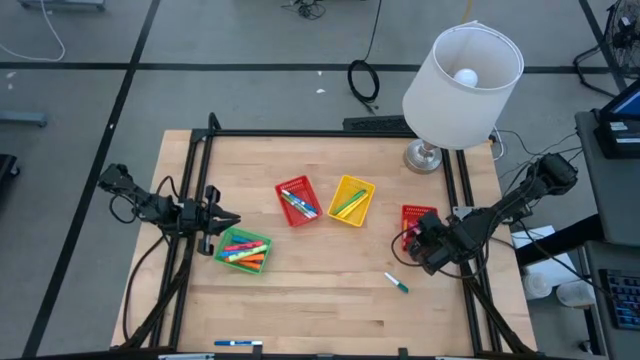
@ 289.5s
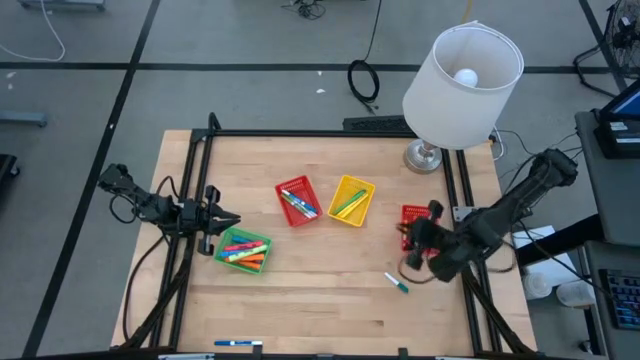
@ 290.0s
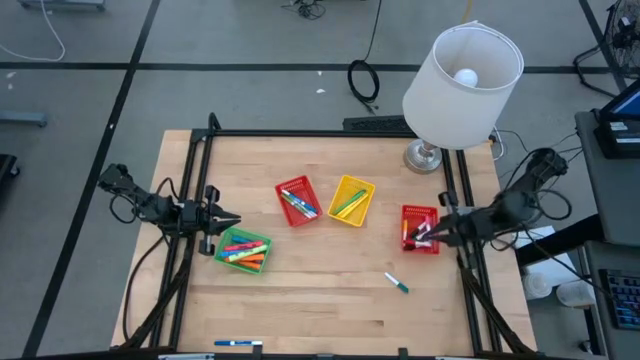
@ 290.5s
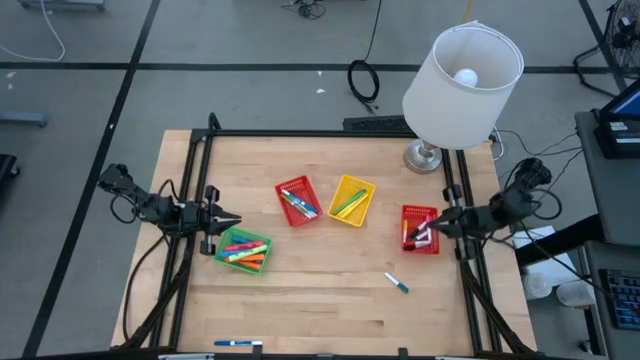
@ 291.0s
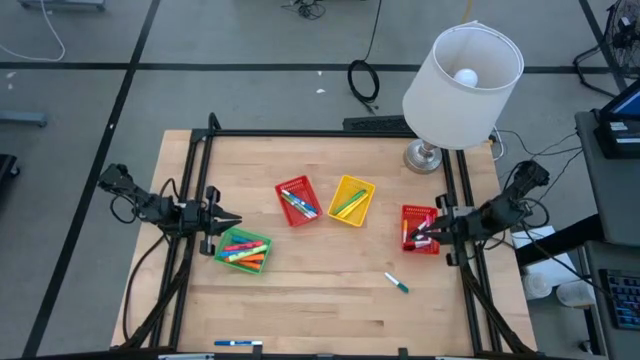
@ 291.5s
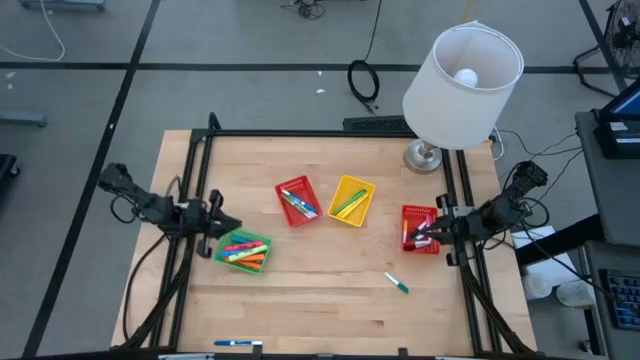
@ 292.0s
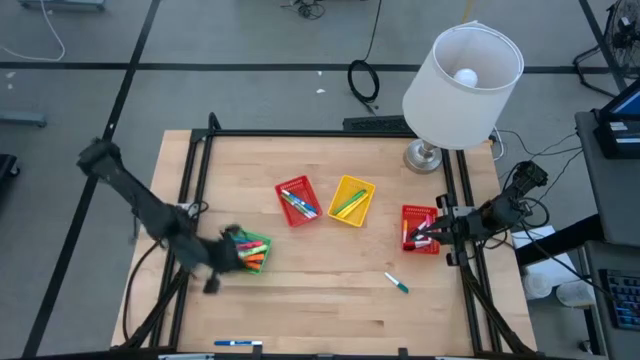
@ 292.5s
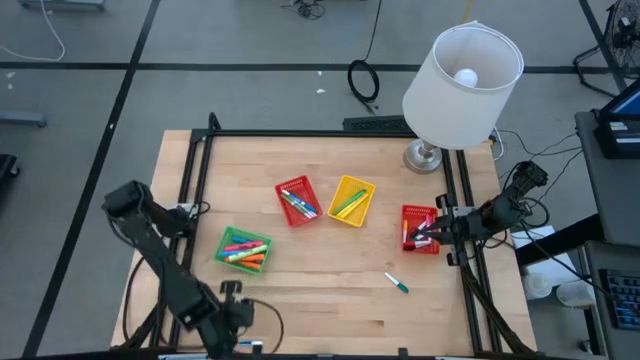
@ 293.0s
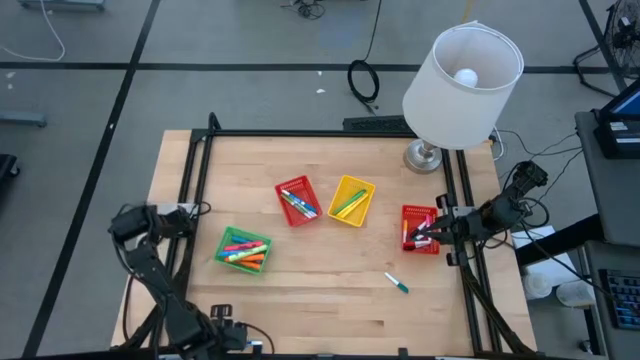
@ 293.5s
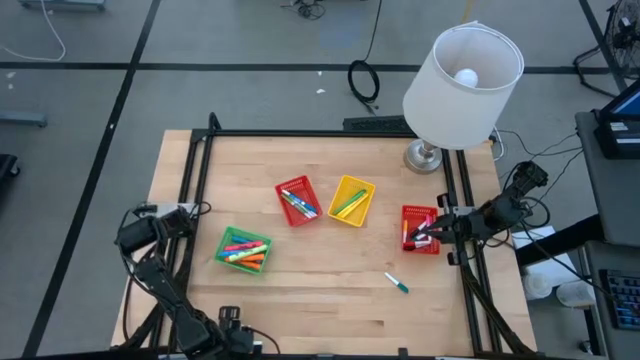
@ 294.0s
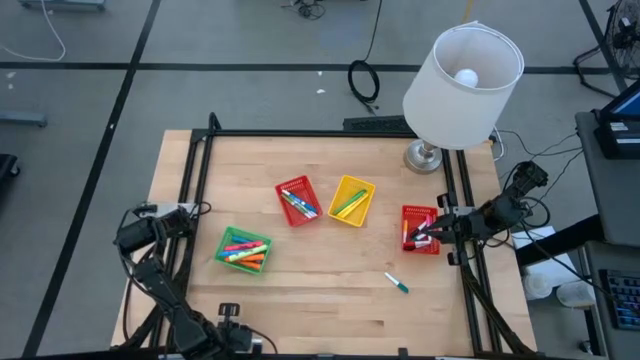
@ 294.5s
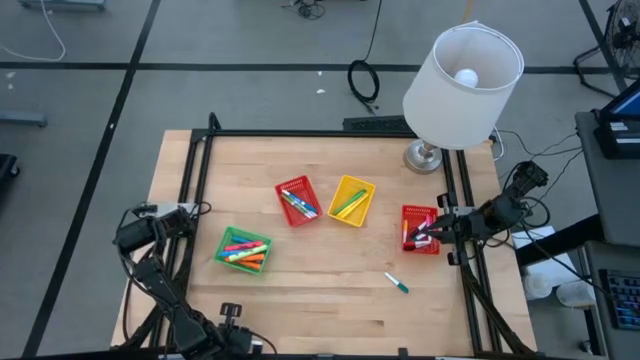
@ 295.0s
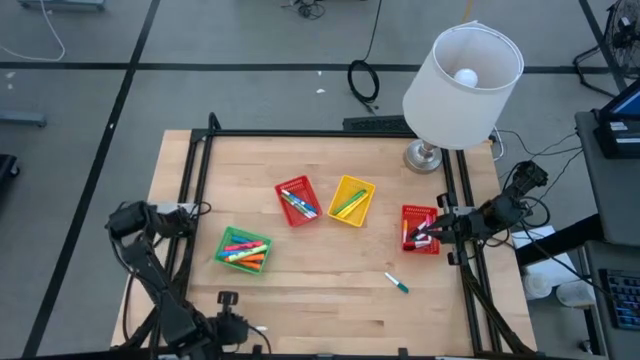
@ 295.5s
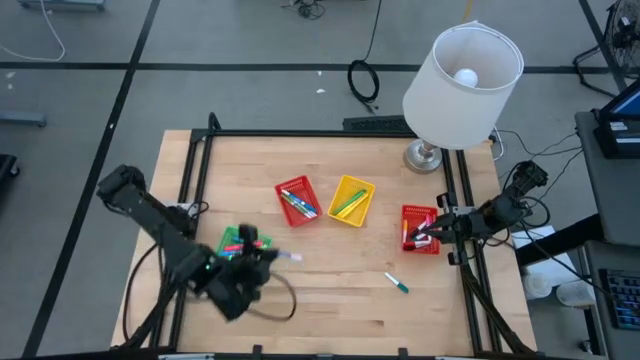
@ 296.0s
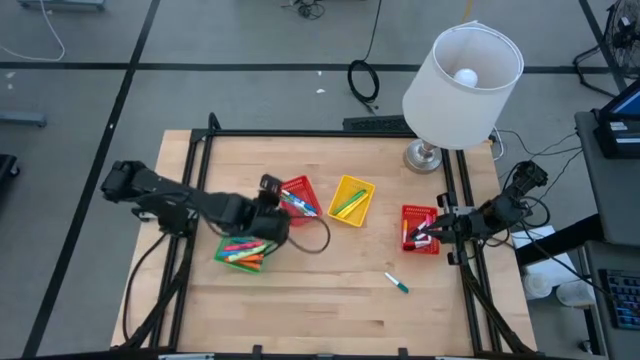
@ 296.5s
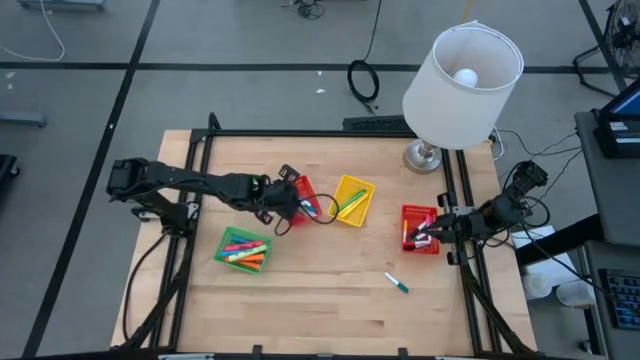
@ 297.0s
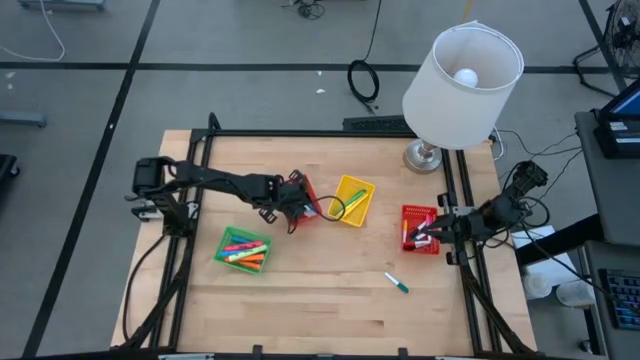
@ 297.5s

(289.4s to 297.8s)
Task: Pick & Place Markers
Put the dark blue marker into the left red bin

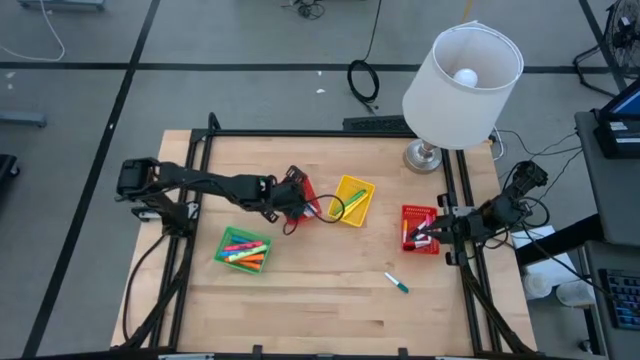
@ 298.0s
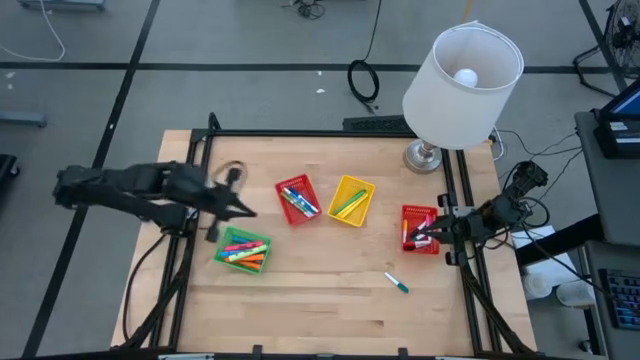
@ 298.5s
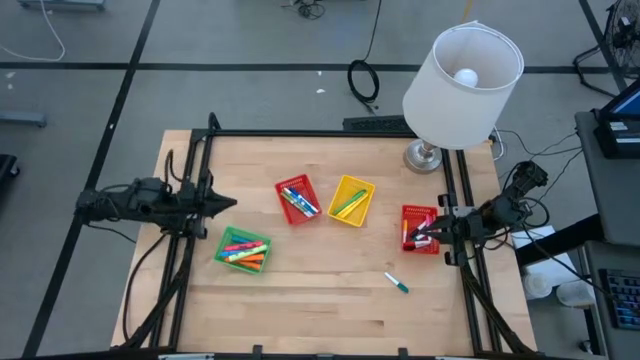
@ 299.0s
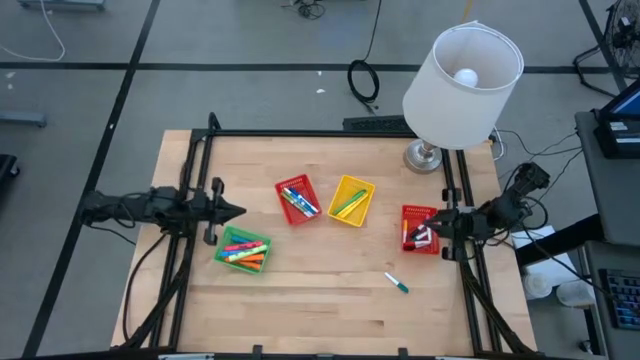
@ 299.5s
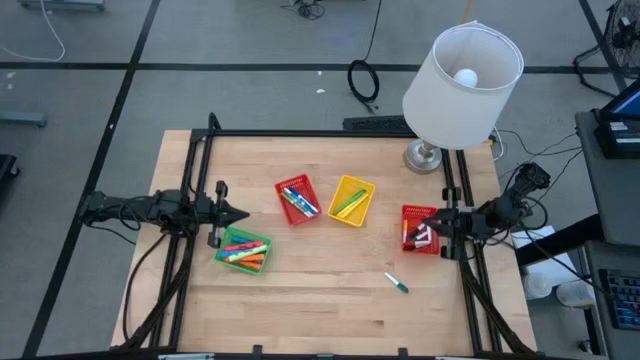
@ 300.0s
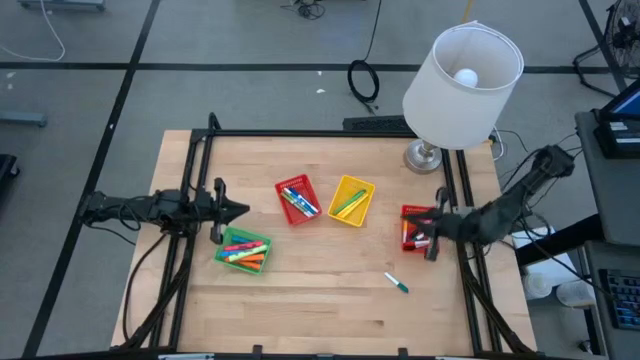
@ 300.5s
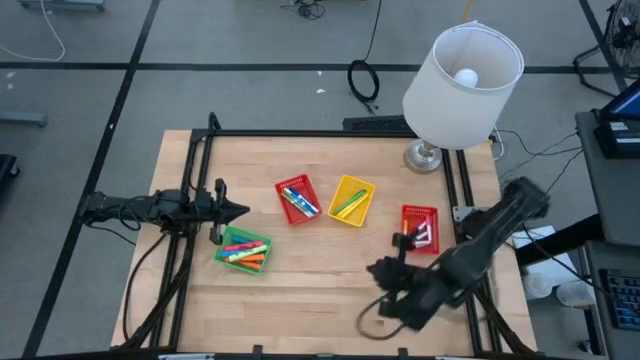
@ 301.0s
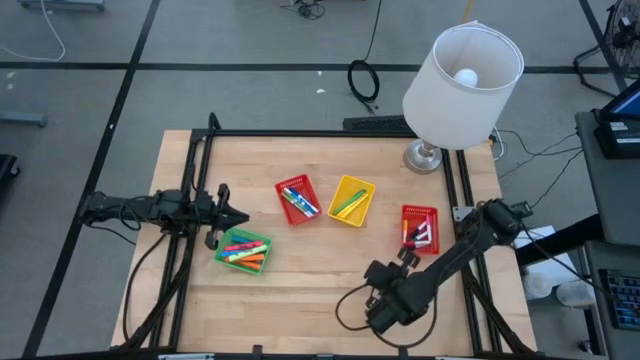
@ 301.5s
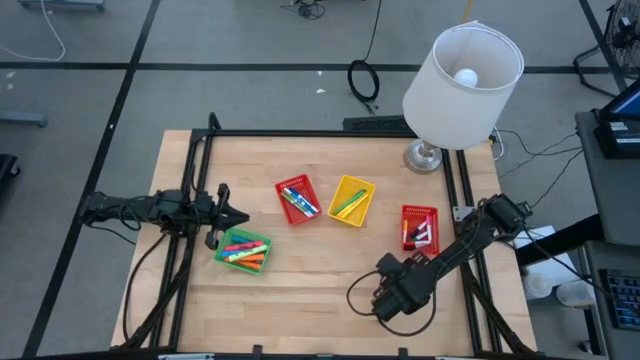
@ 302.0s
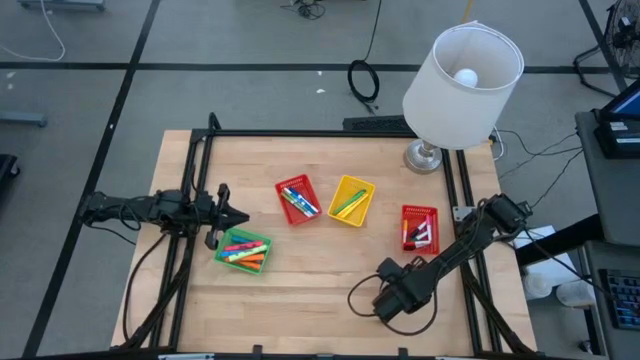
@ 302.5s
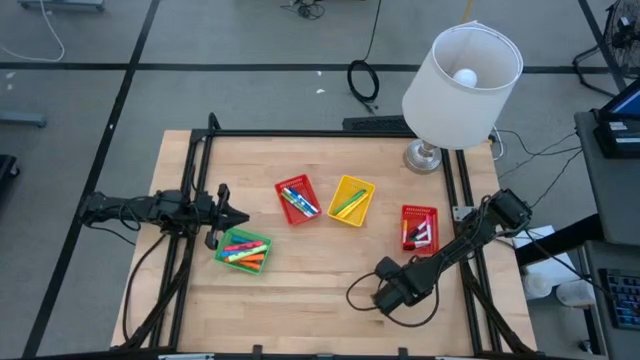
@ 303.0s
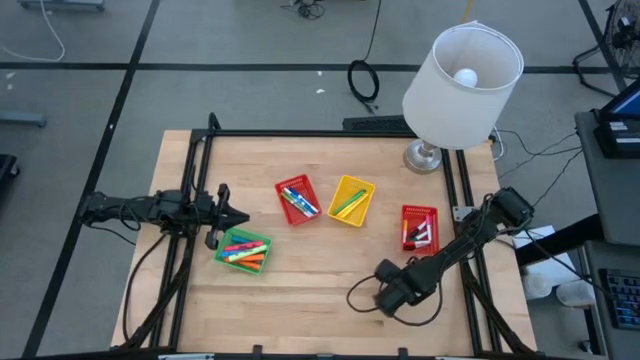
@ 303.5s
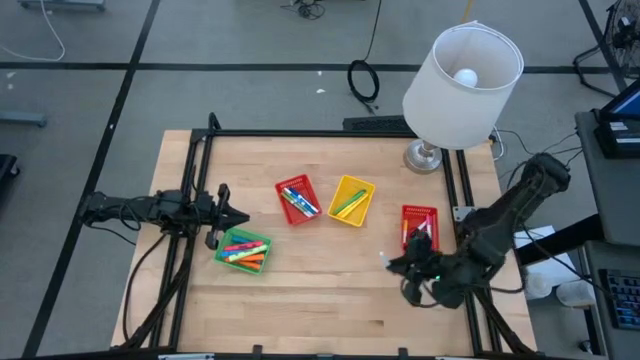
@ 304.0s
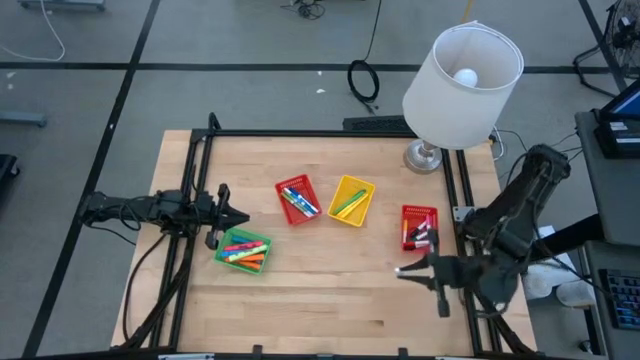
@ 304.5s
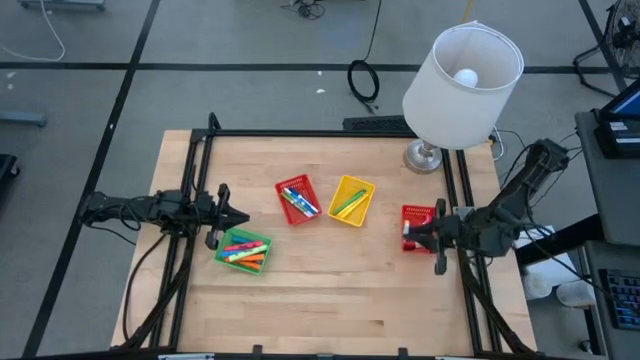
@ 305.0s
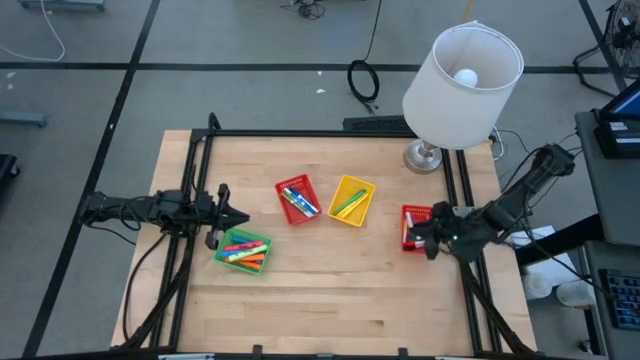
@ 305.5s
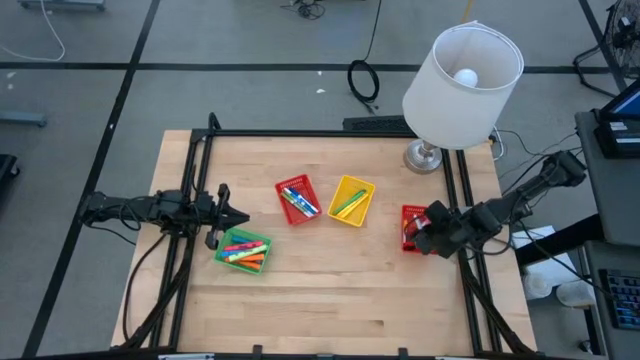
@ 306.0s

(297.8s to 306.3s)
Put the green marker into the right red bin

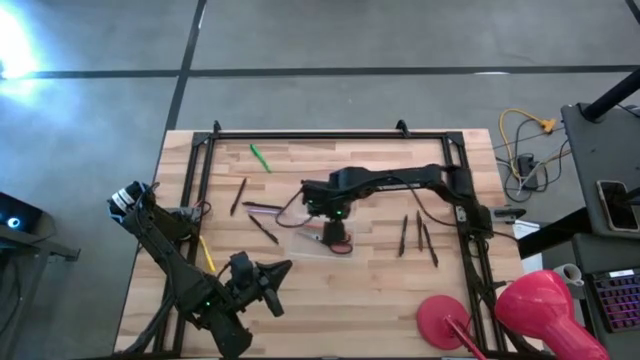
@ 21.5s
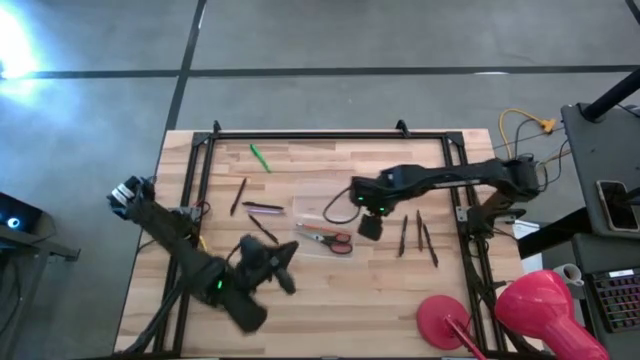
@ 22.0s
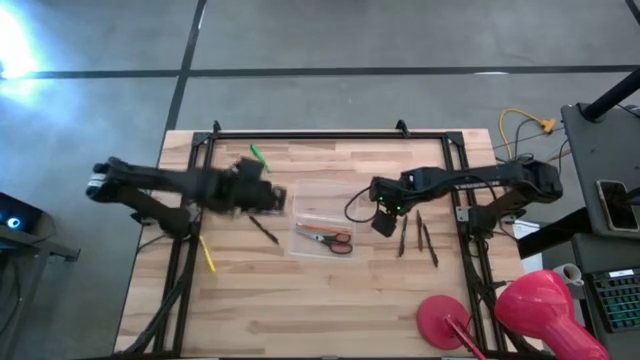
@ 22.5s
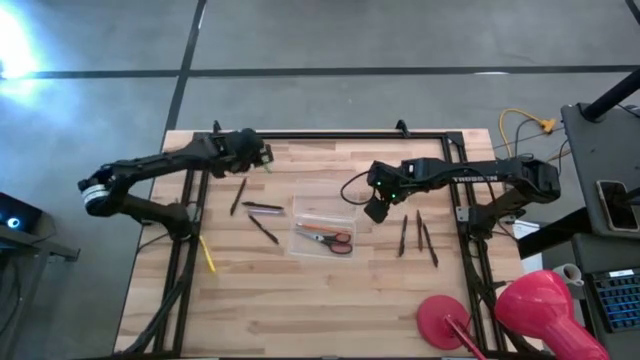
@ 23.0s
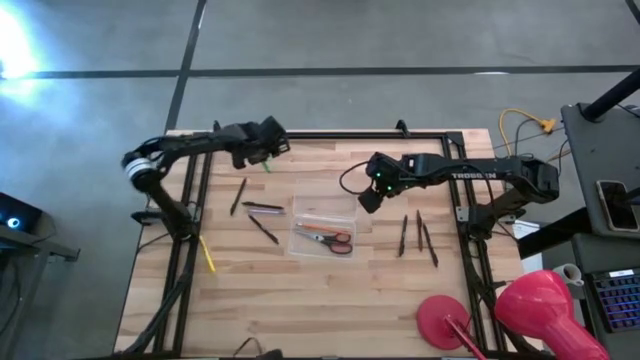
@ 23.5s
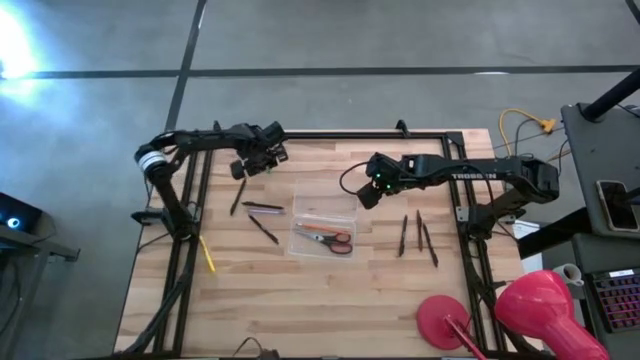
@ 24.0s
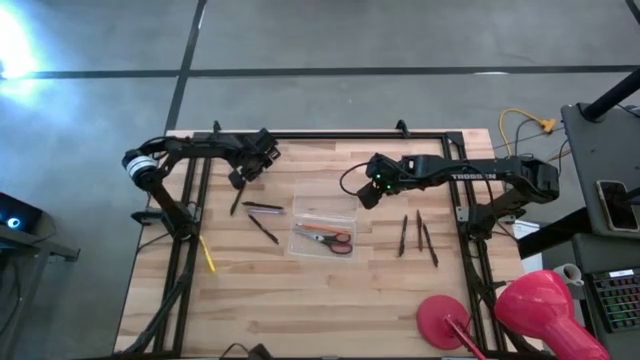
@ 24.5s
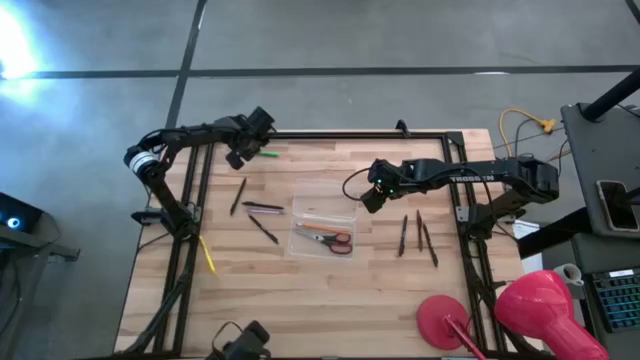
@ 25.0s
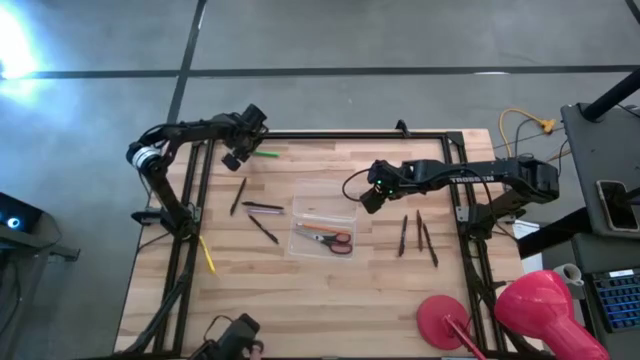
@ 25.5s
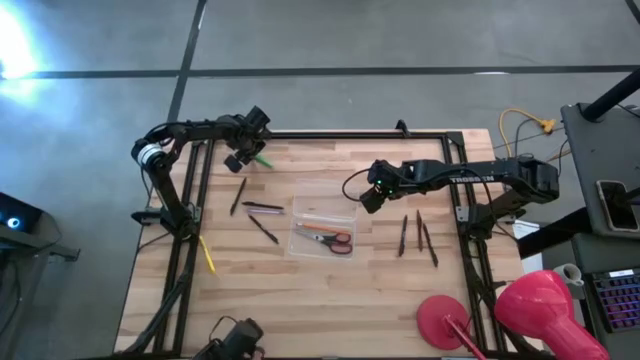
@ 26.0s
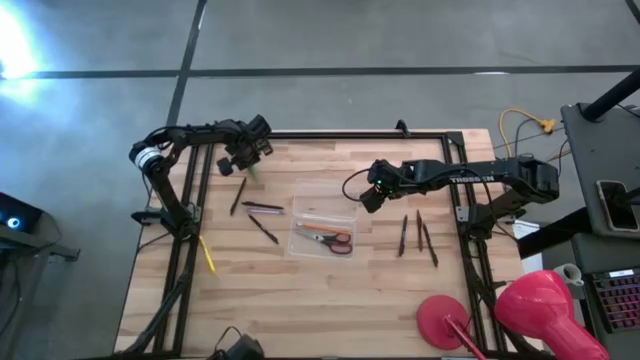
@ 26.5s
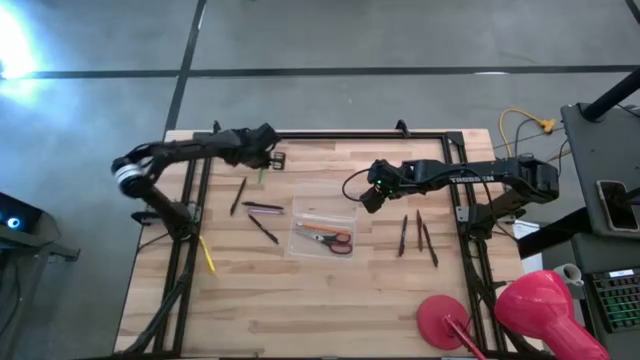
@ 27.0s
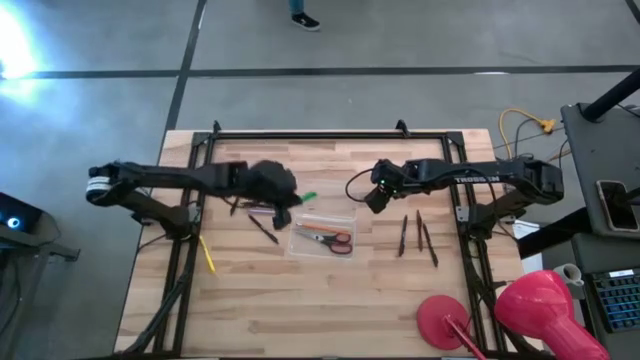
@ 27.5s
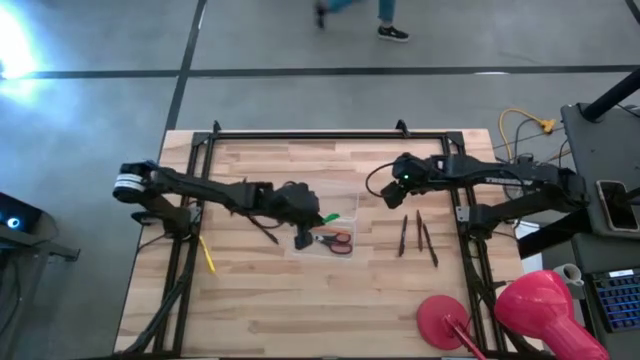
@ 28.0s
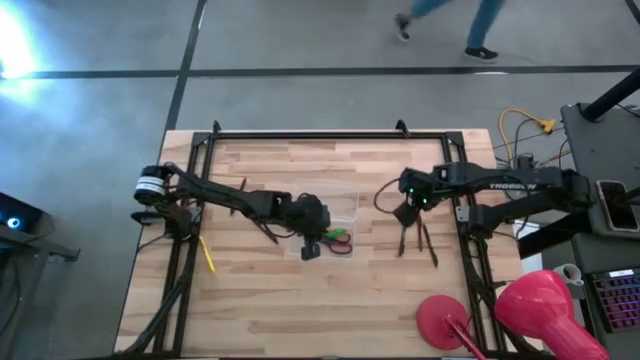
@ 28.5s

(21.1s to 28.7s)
Task: Pick & place school supplies into a supply box
Put the green pen into the transparent supply box
